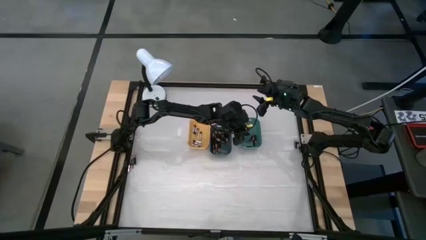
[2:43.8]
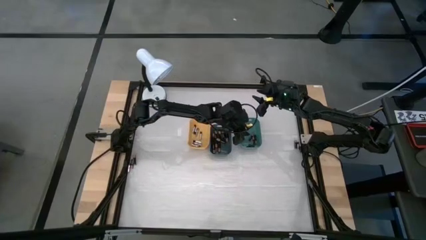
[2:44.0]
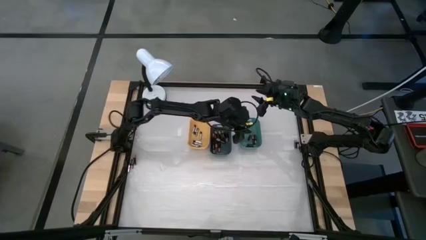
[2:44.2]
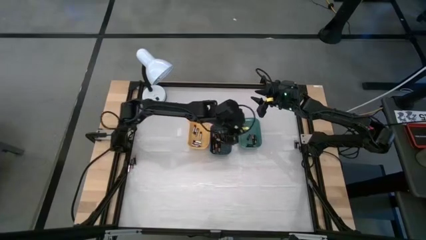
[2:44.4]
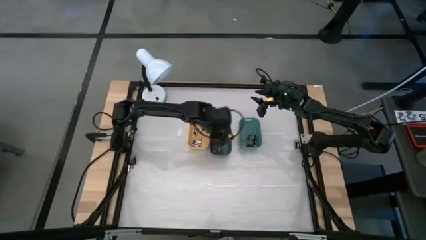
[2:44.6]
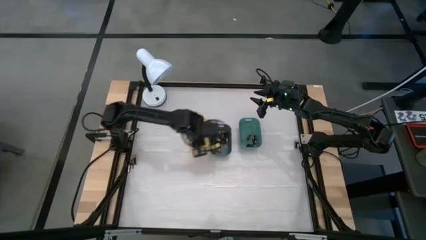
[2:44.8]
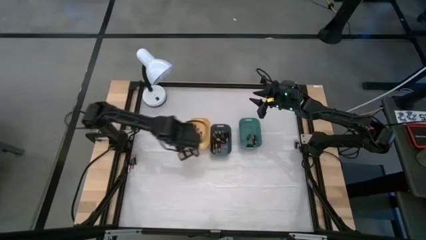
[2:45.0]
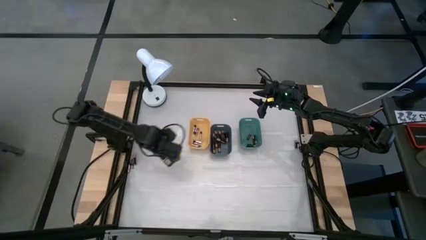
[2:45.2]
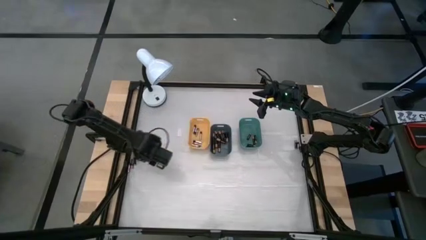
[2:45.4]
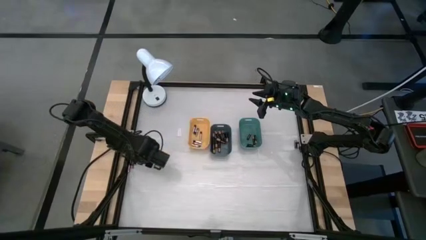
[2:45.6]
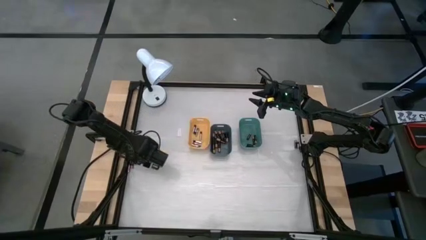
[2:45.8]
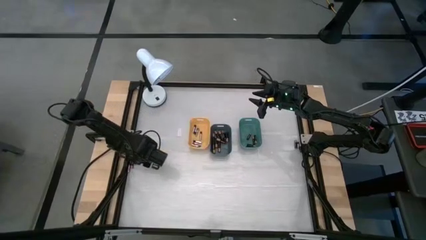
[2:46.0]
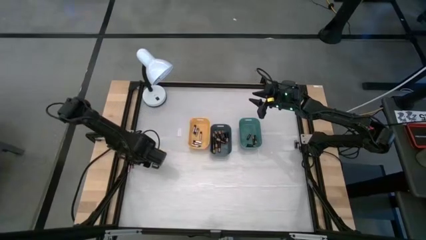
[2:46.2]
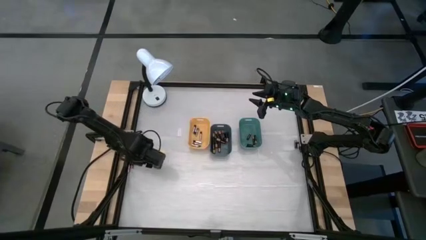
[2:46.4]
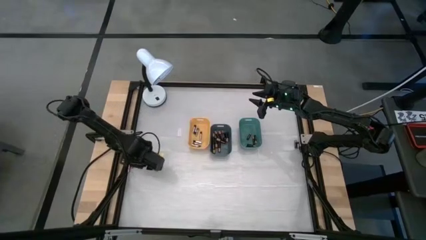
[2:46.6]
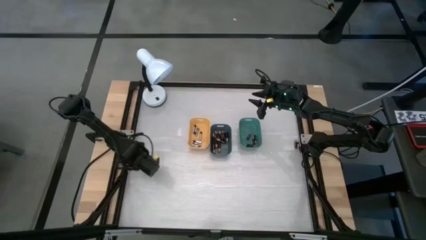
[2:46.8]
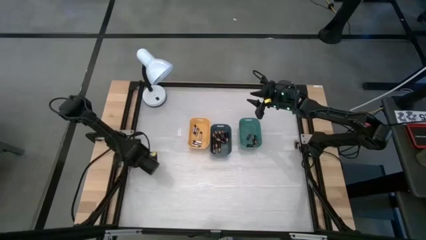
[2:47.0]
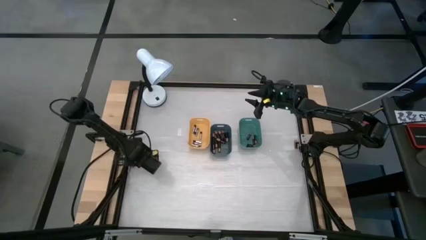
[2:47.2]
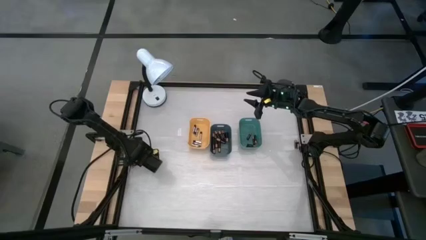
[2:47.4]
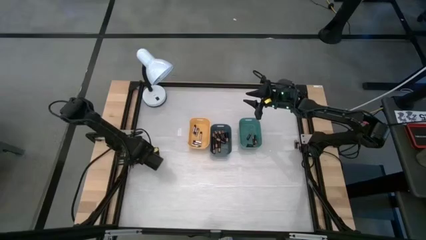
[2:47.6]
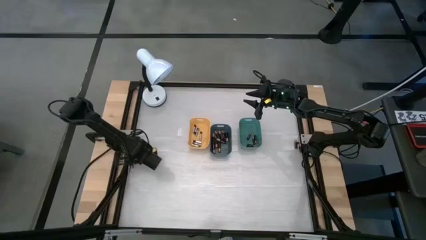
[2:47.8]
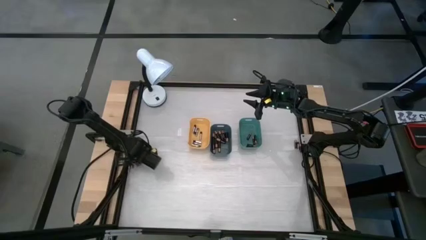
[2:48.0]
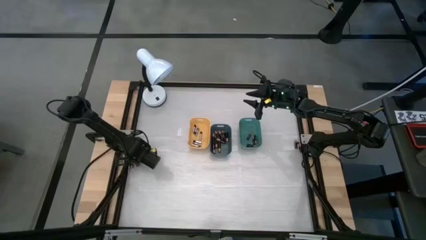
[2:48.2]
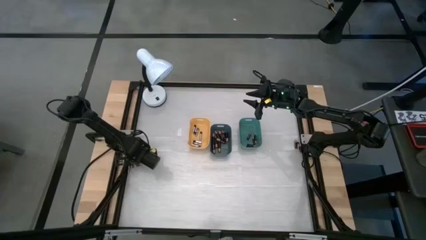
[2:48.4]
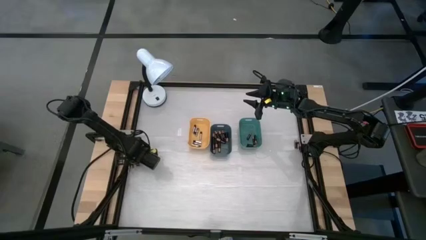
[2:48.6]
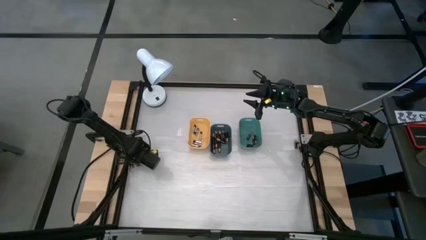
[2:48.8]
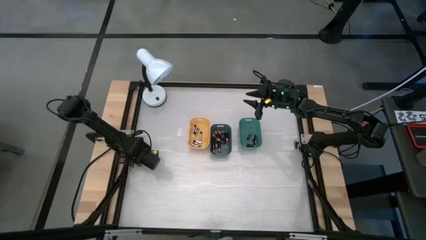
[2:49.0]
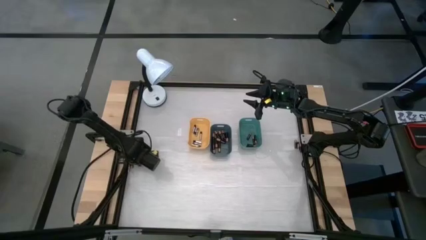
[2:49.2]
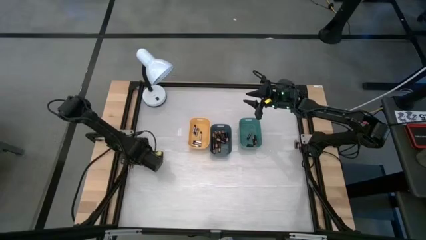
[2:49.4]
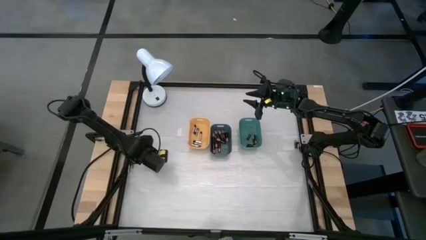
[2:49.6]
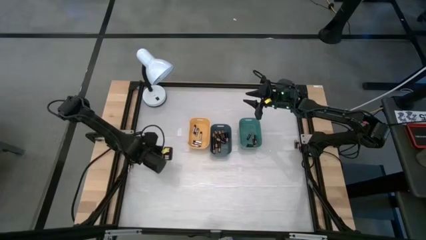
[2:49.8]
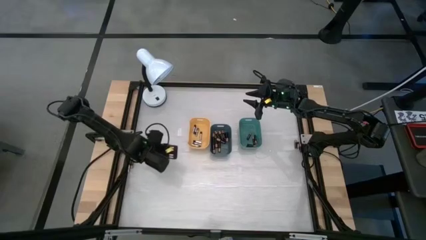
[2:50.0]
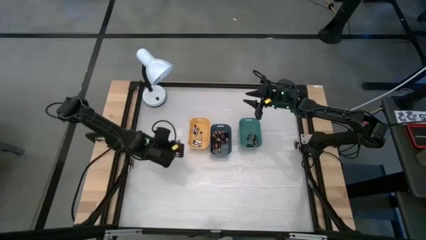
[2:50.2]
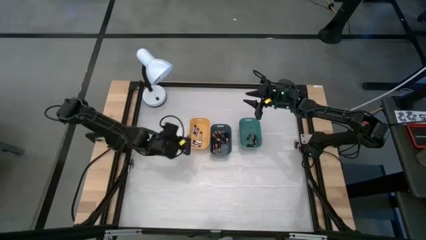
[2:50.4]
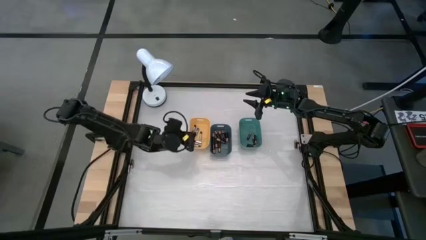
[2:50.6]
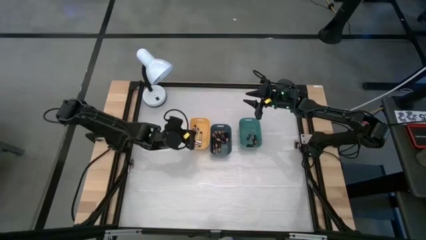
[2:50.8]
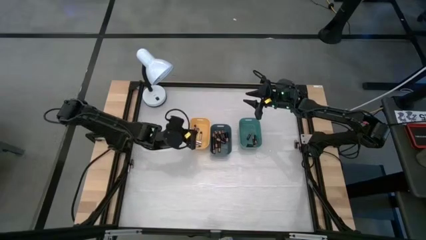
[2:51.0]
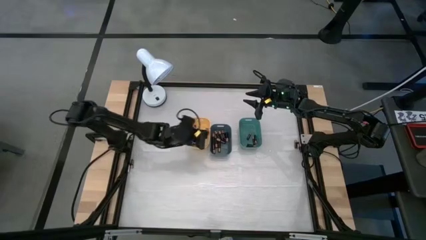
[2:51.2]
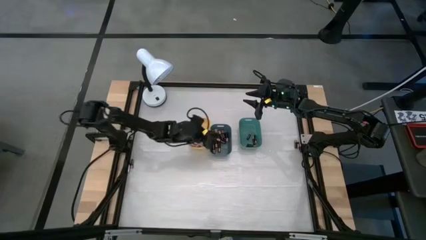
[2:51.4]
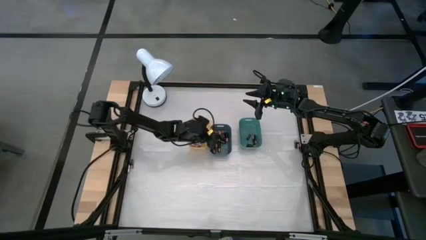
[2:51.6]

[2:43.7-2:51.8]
Task: Sort batteries
Put the black battery into the blue bin

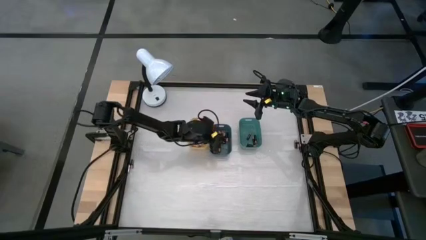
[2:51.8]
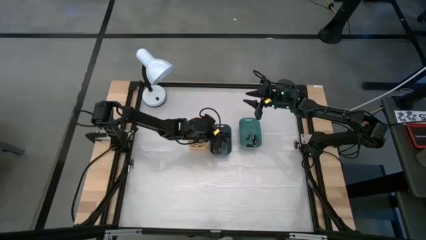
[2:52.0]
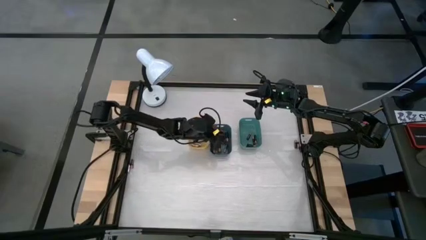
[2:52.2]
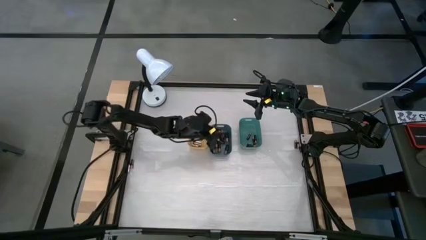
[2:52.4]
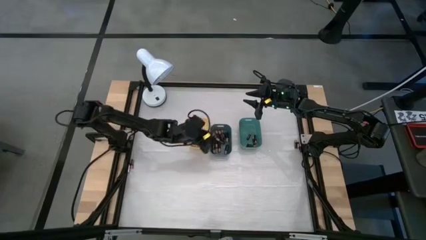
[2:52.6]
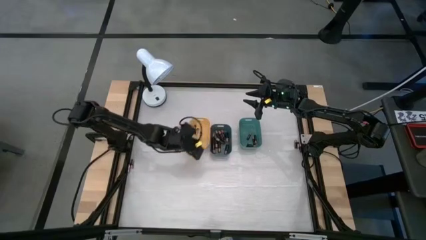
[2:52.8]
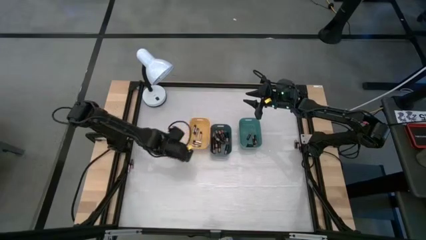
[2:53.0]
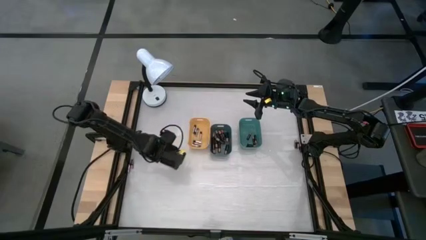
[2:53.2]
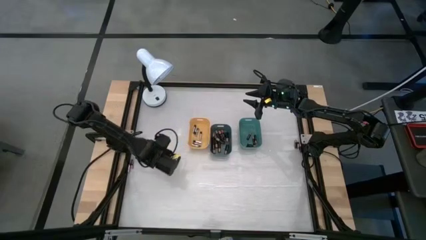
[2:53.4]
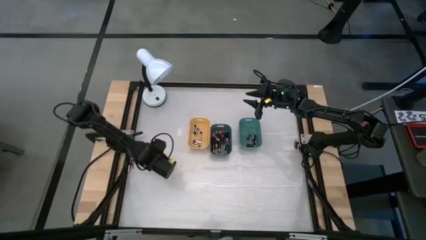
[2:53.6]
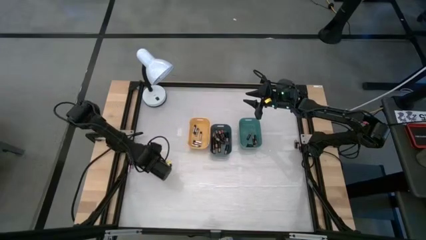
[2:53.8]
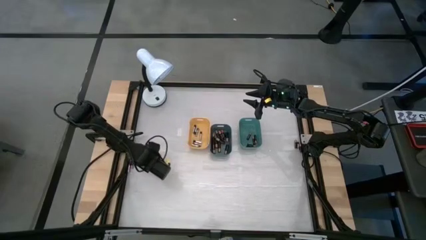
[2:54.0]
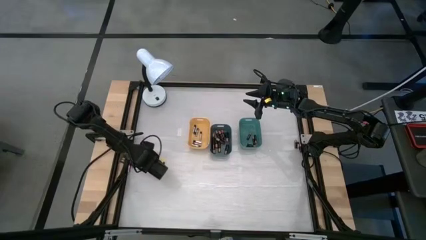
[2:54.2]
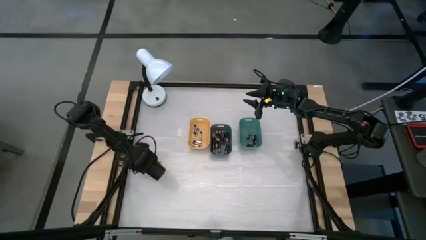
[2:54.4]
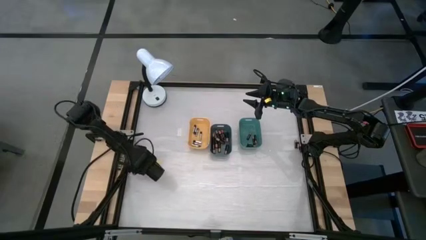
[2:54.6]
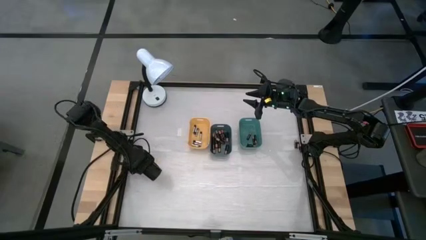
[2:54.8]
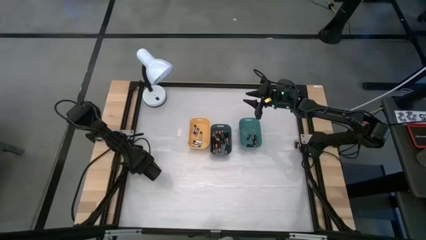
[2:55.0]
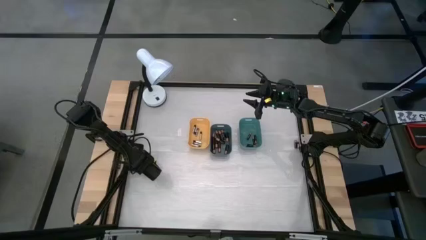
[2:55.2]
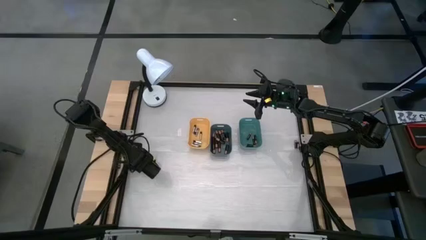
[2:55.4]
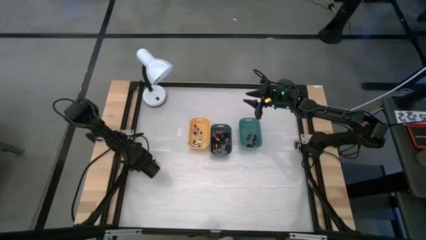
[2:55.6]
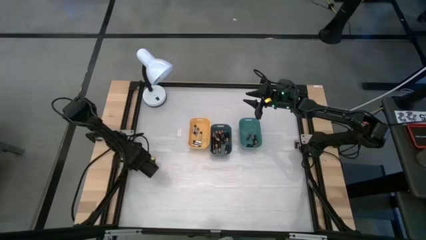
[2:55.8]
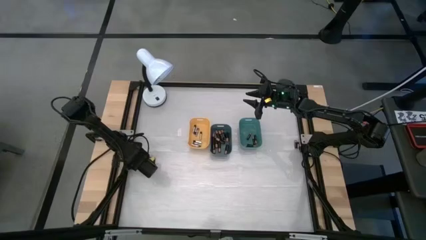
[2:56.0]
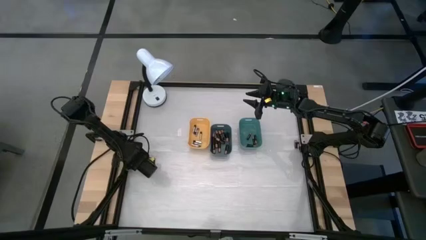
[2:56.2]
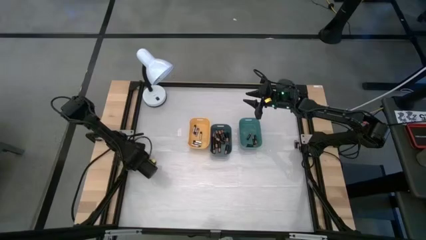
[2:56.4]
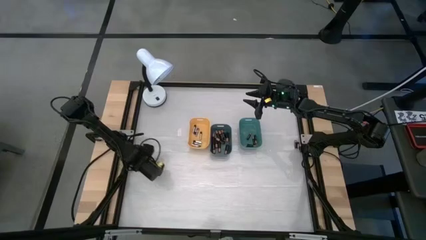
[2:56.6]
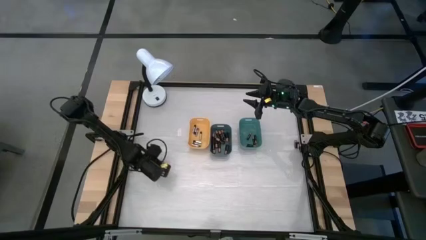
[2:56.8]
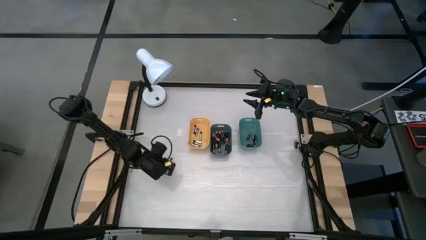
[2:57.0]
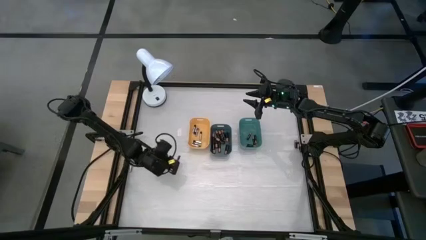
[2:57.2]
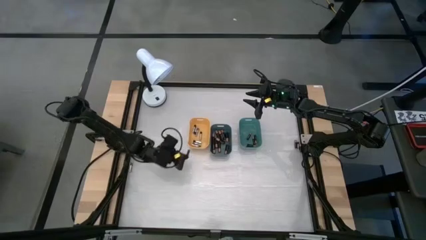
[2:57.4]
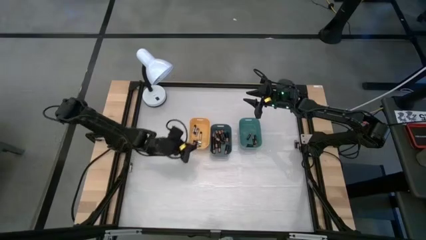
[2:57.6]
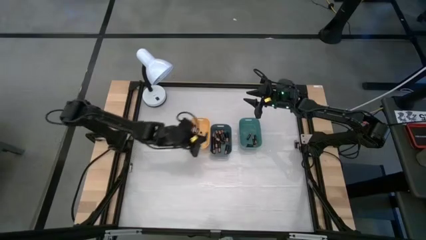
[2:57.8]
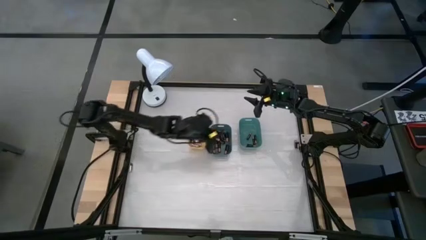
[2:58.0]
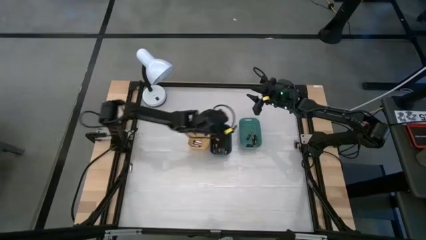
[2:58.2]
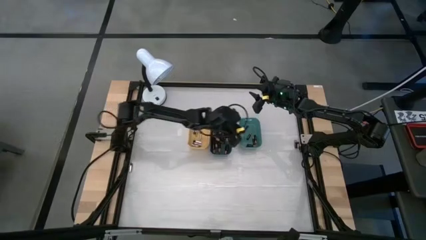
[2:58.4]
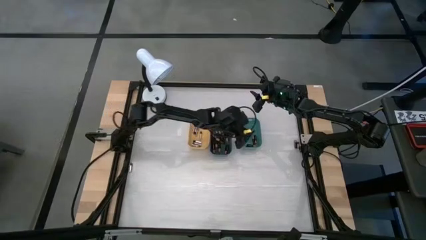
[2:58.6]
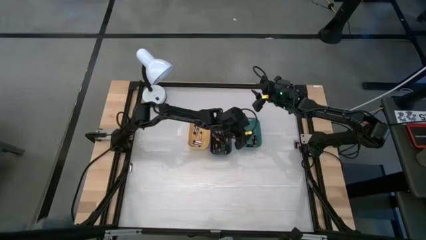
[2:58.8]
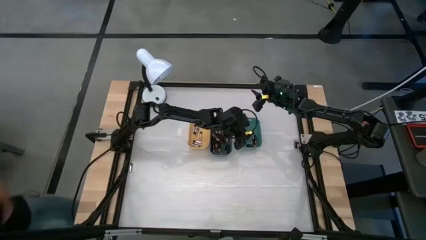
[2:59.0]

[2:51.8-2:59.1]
Put the black battery into the green bin
